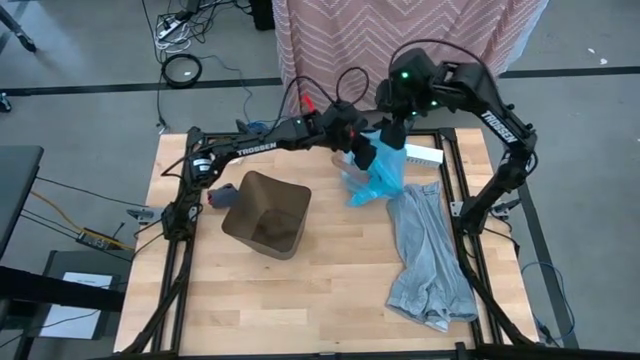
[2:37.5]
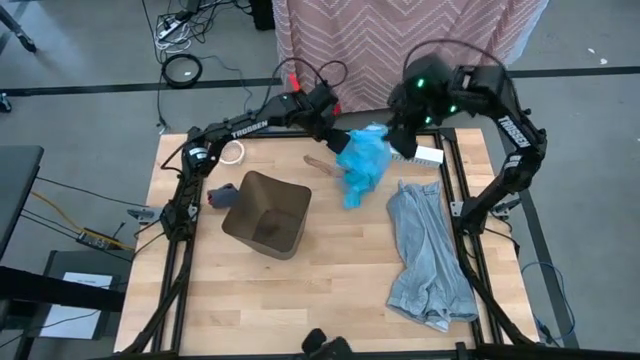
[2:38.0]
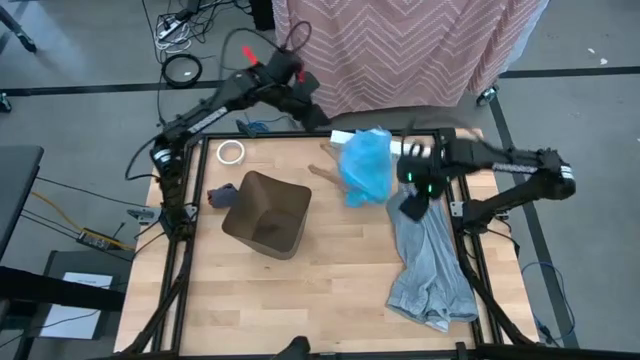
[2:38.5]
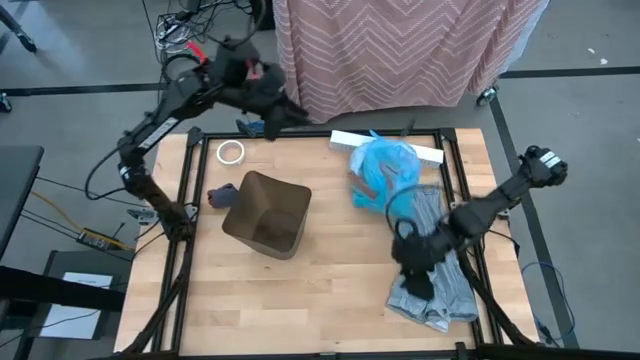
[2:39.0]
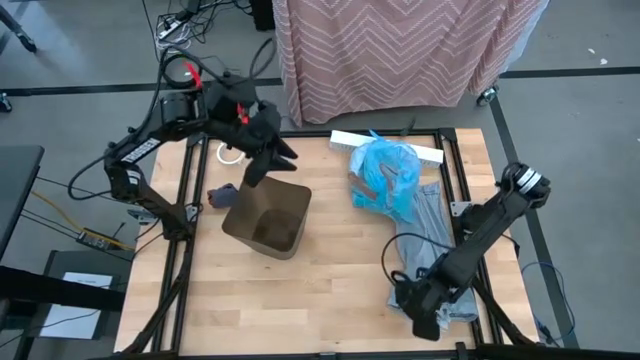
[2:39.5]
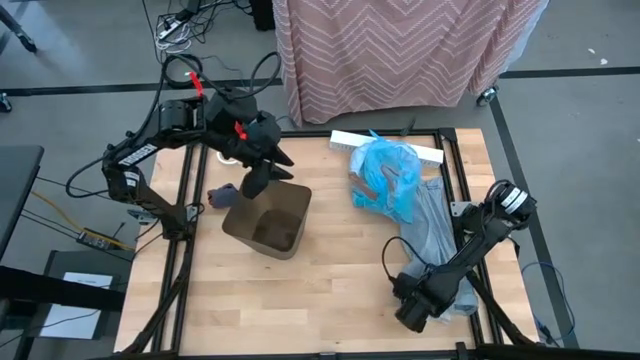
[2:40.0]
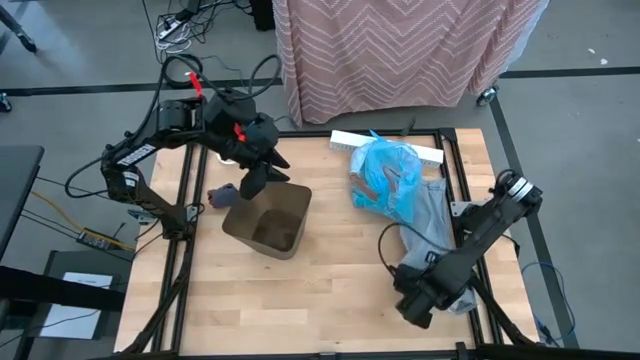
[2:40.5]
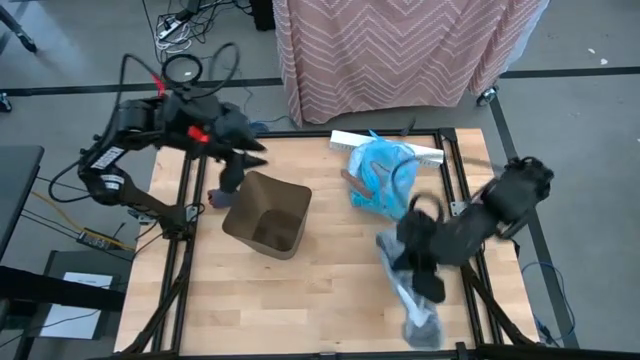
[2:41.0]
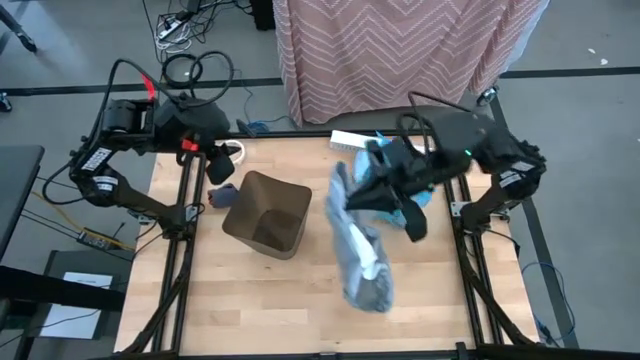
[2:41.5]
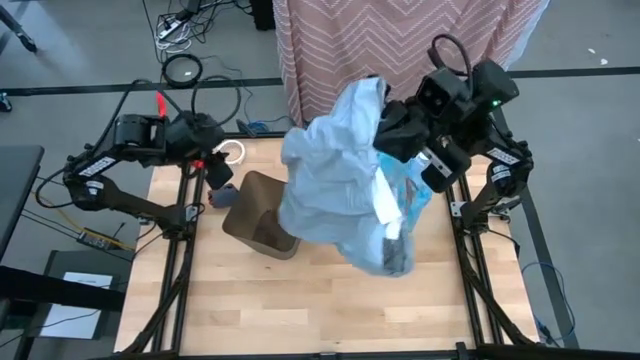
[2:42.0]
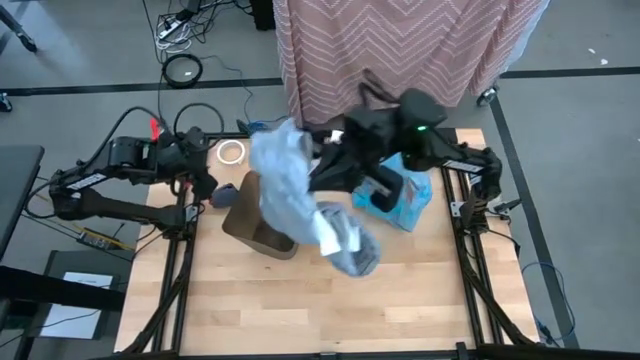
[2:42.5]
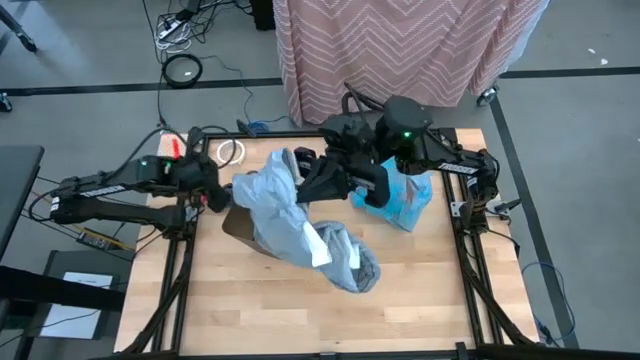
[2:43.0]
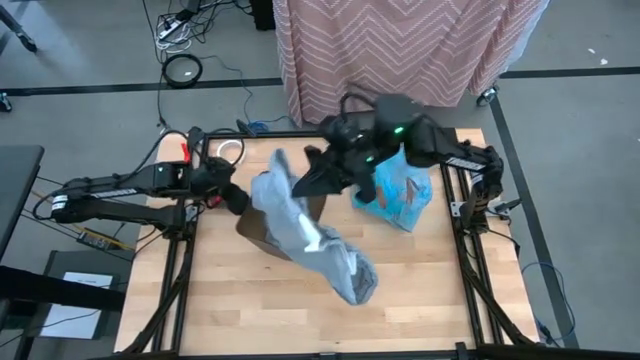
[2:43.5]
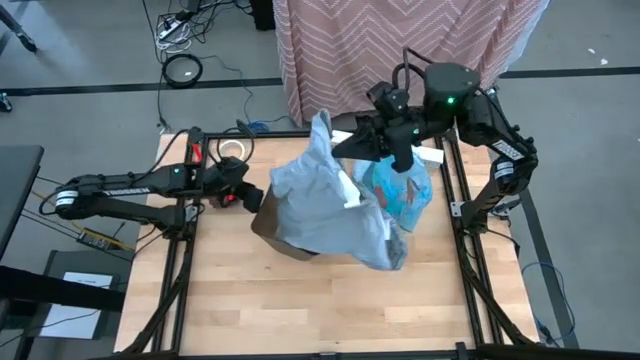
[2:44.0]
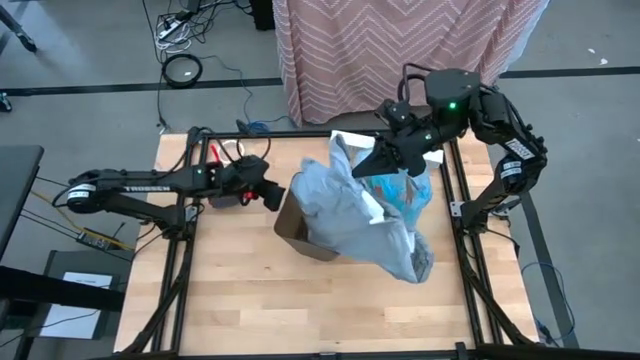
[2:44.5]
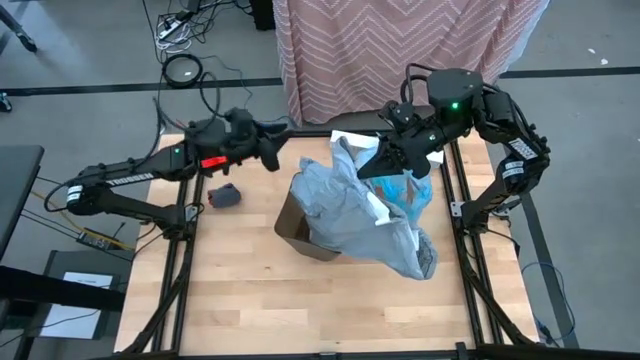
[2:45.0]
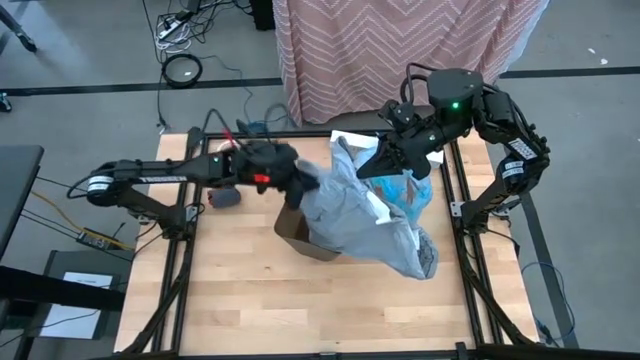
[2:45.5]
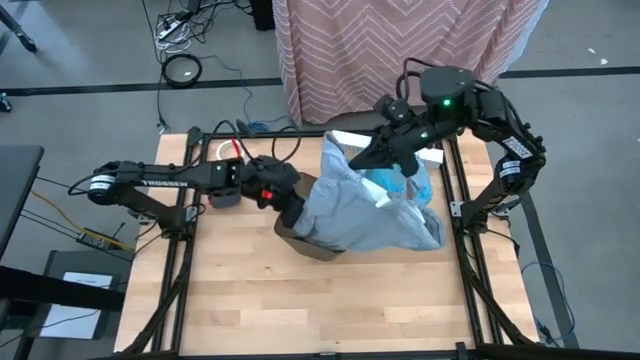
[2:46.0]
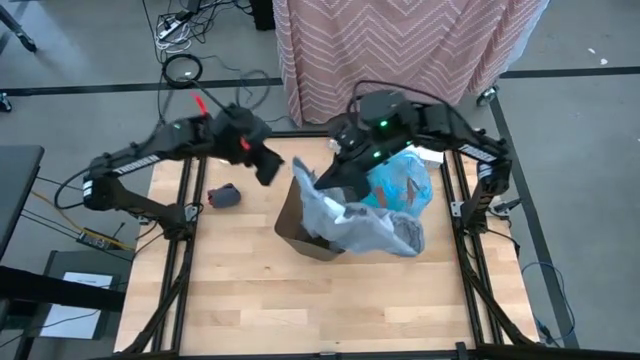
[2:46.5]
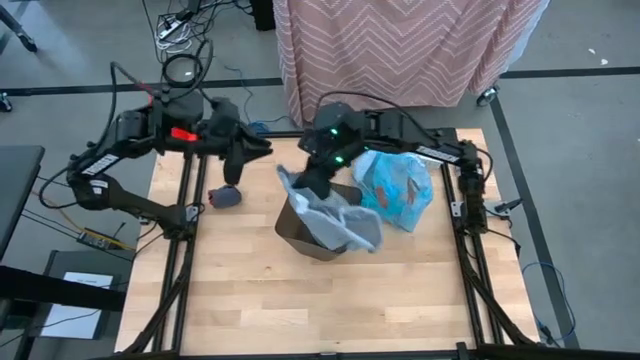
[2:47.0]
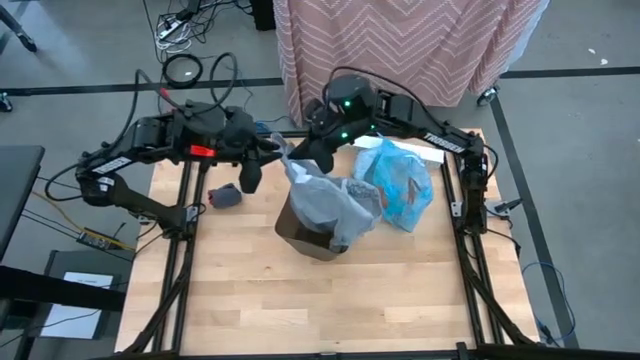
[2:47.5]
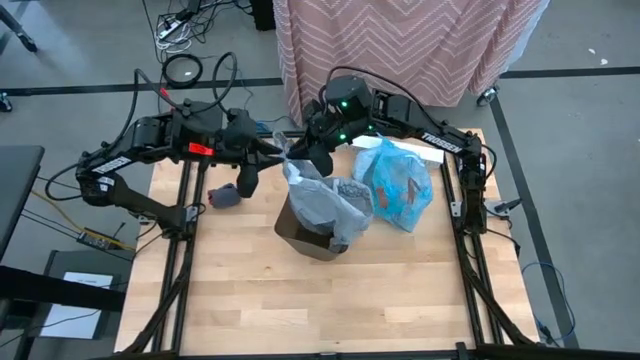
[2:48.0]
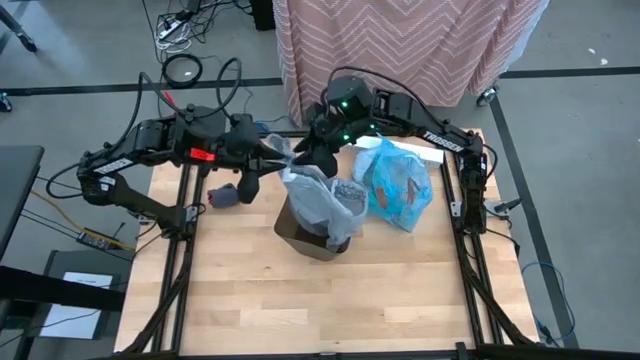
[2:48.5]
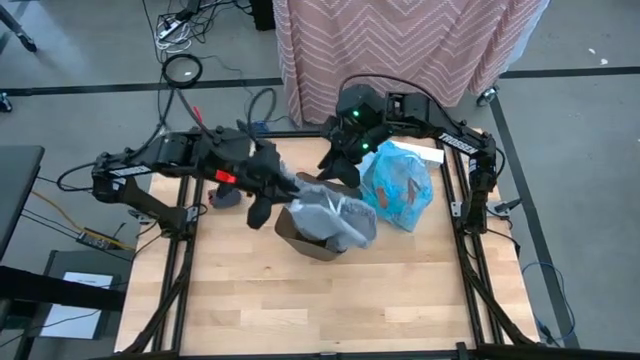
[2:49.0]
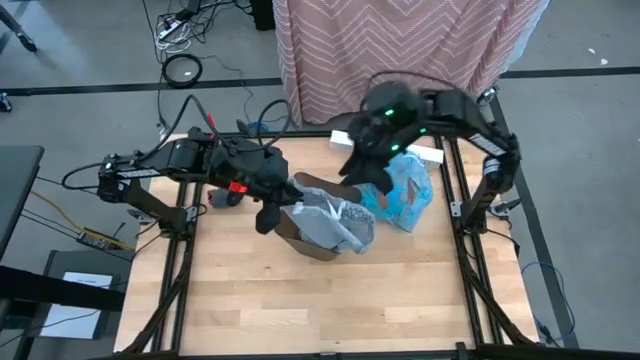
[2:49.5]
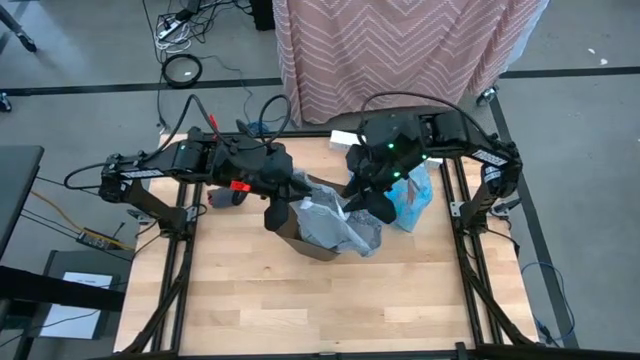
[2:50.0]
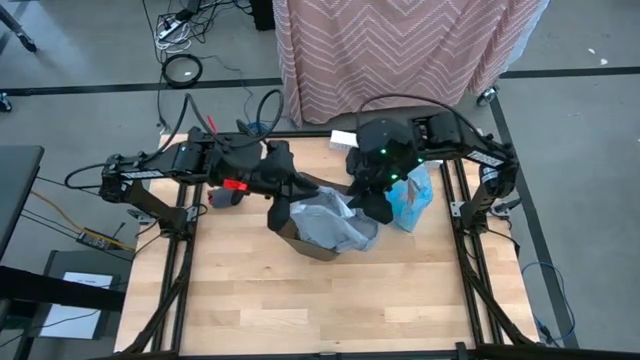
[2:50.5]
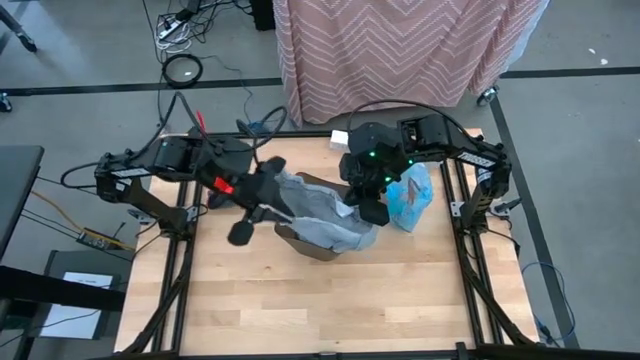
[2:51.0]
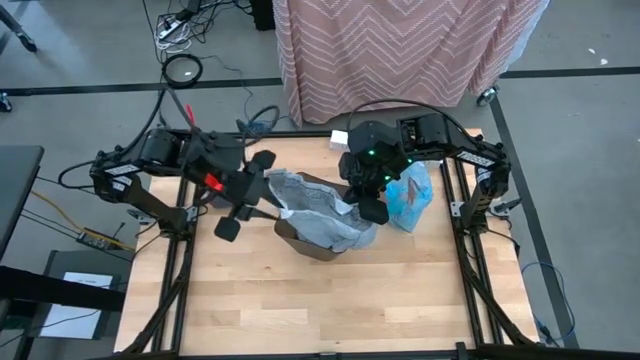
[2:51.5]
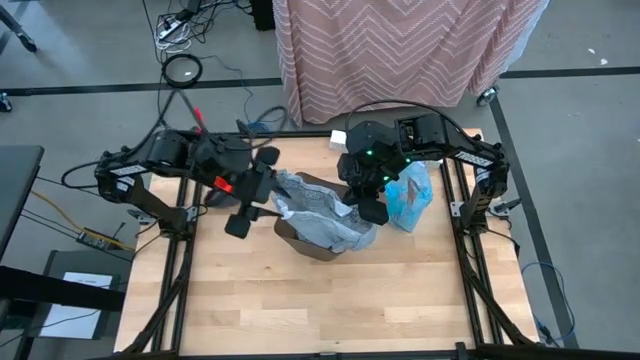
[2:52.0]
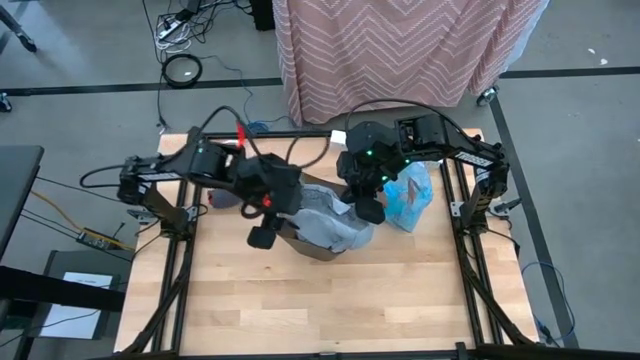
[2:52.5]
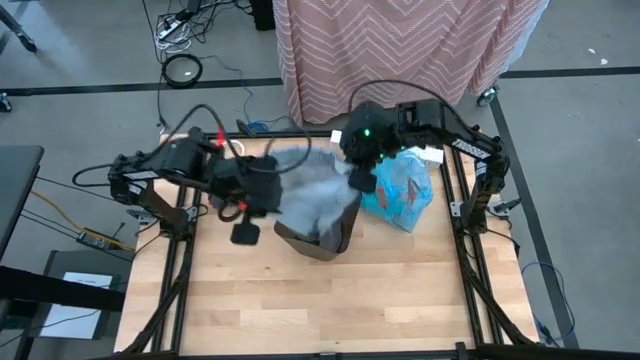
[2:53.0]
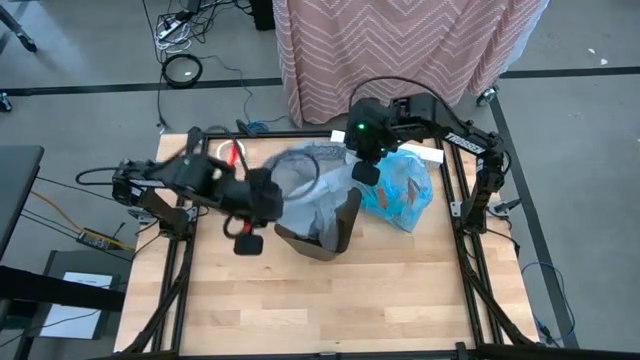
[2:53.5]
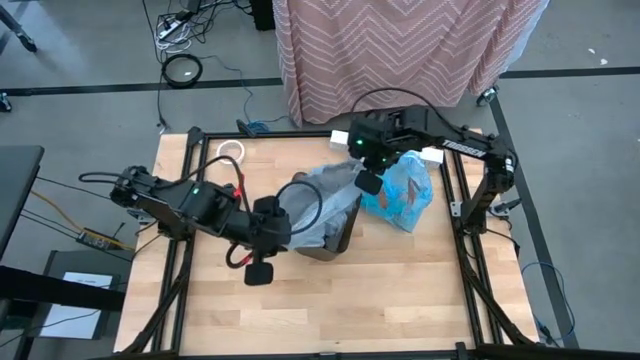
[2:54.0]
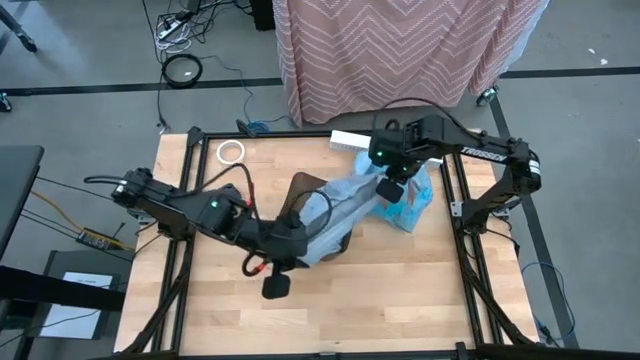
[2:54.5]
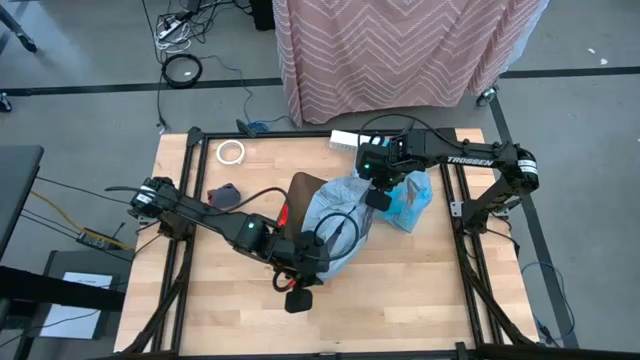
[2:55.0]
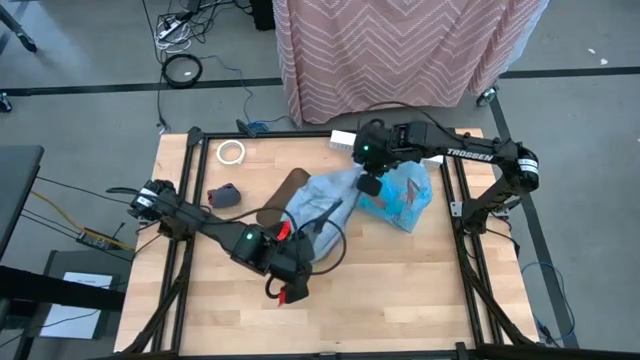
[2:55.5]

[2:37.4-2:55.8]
Task: place trash/remove bag and relplace
Put the gray trash bag into the black trash bin

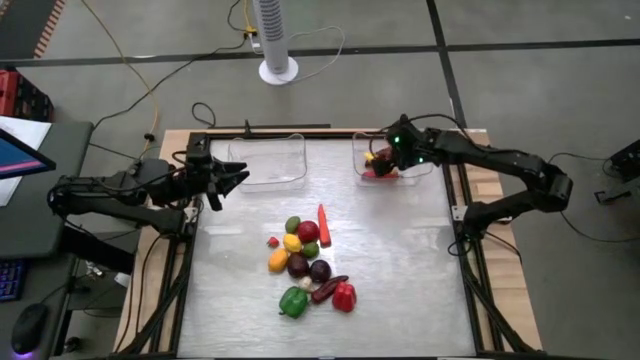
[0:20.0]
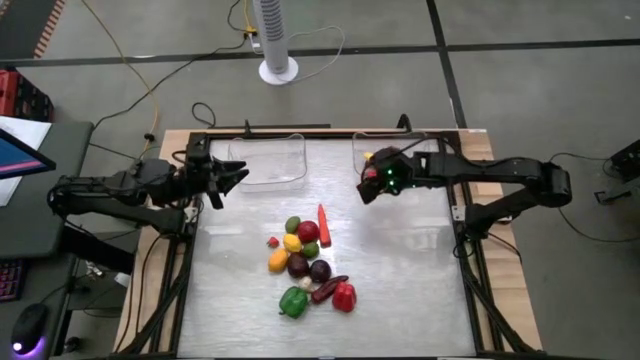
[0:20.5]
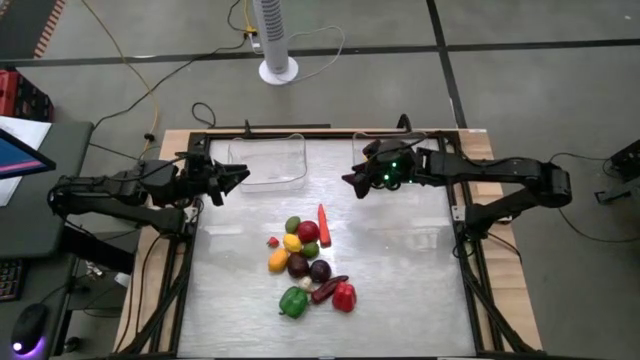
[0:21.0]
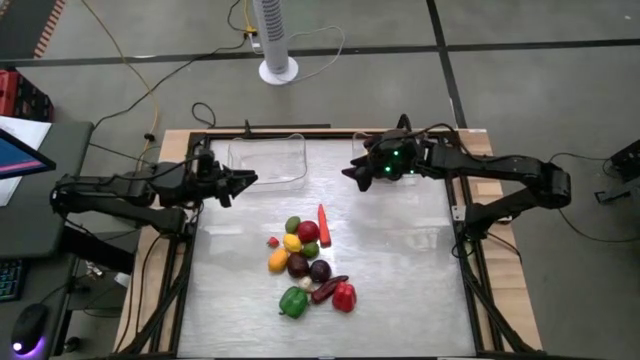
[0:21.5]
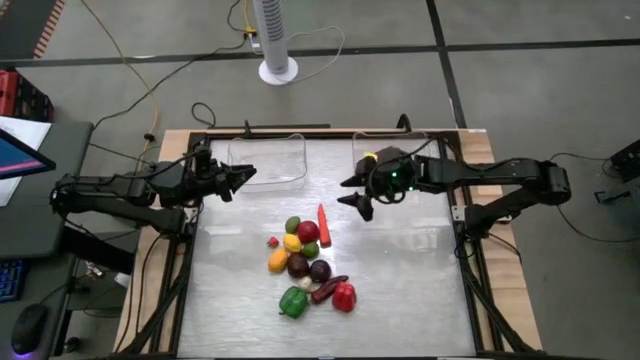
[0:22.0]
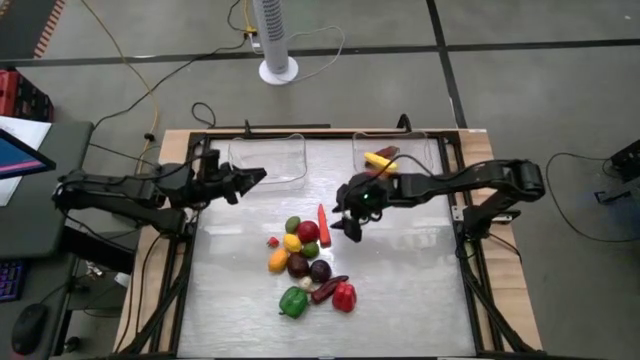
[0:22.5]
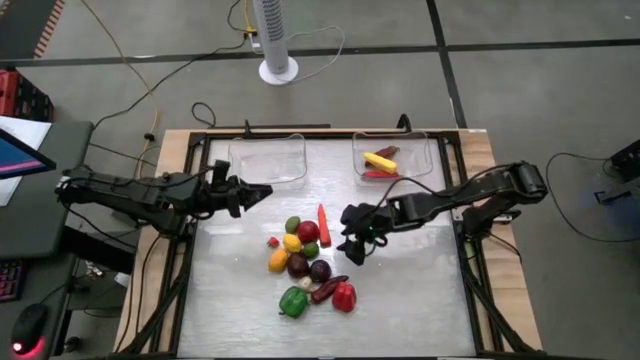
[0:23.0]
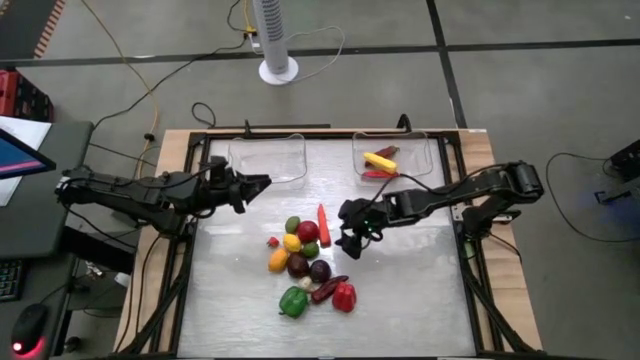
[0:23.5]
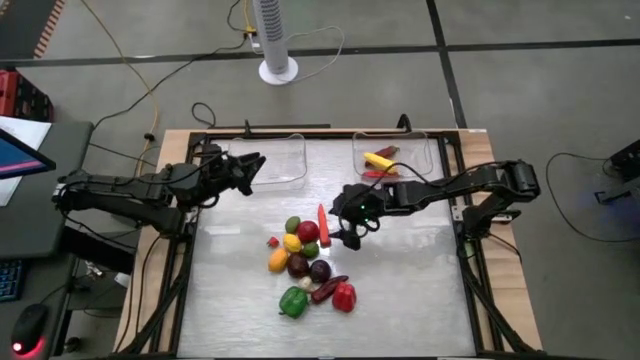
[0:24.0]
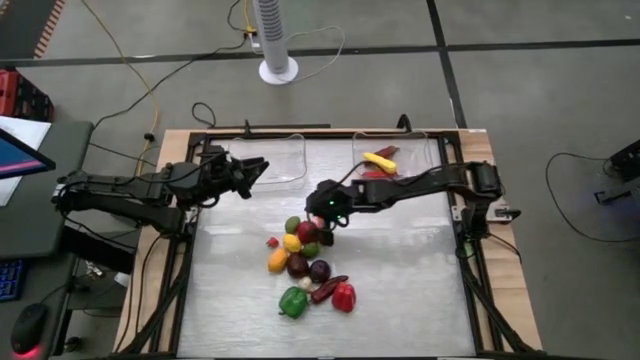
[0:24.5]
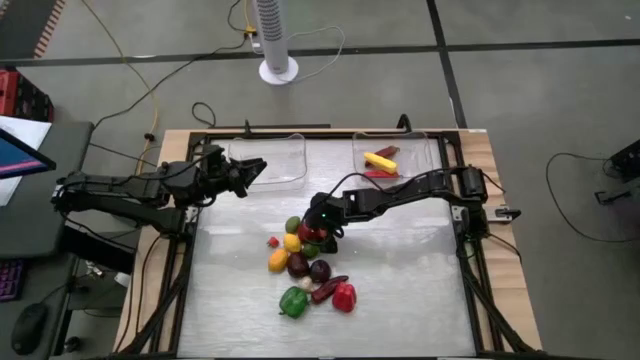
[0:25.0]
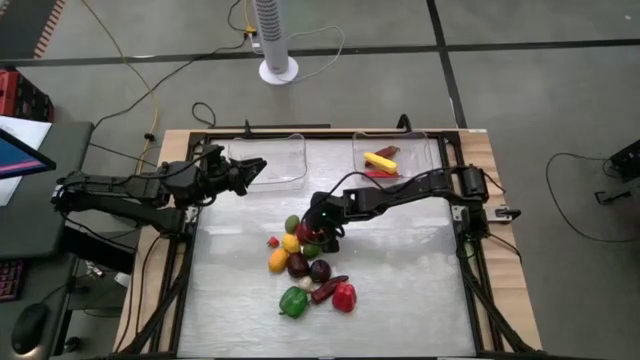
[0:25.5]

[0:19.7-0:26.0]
Task: Sort produce into baskets
Put the red tomato into the left transparent bin
